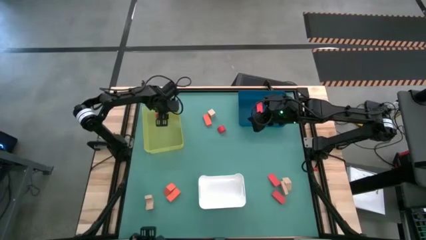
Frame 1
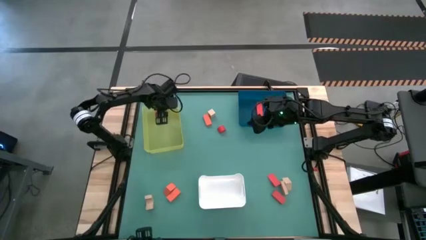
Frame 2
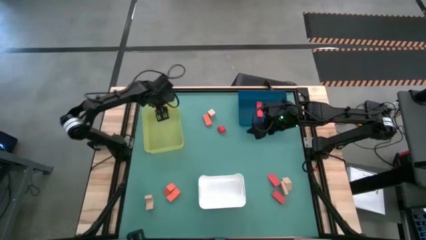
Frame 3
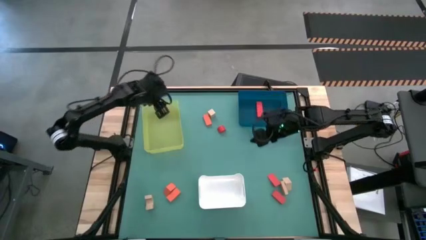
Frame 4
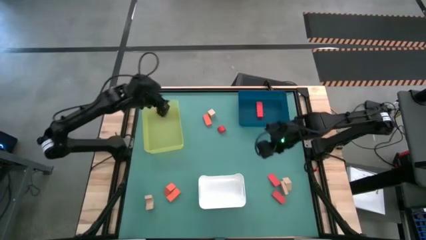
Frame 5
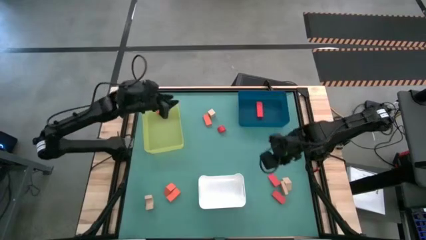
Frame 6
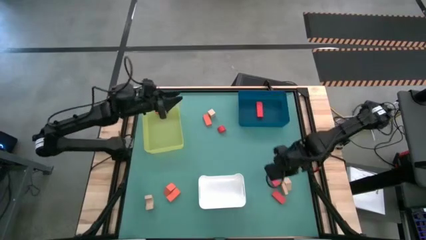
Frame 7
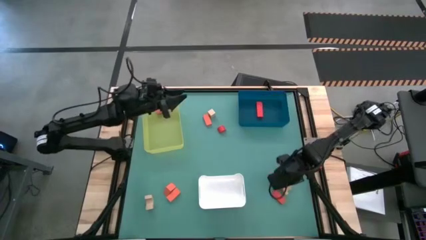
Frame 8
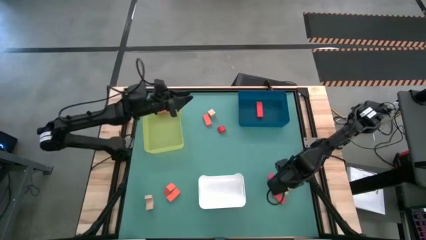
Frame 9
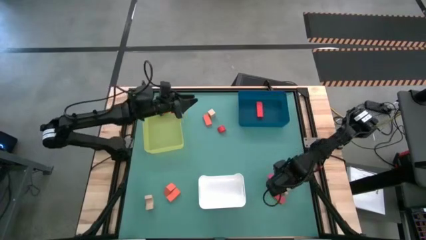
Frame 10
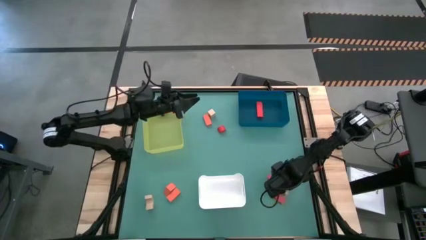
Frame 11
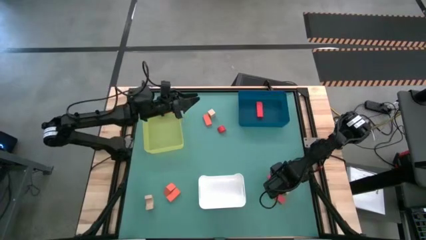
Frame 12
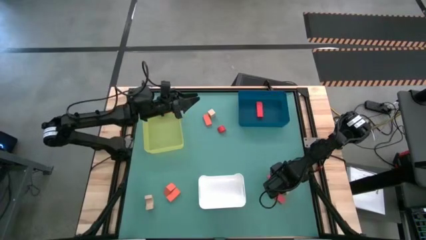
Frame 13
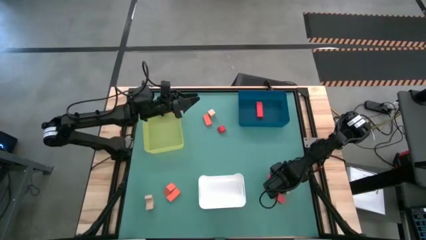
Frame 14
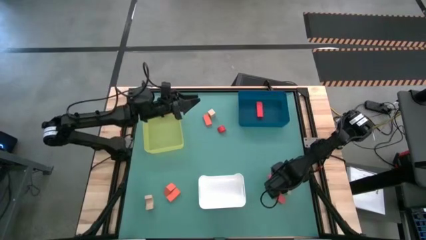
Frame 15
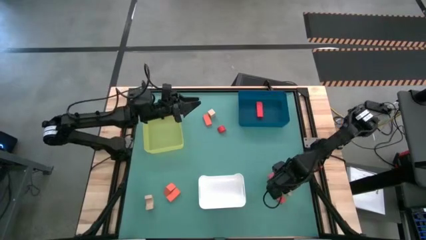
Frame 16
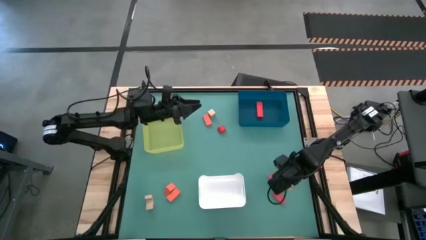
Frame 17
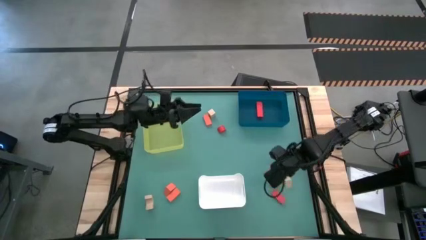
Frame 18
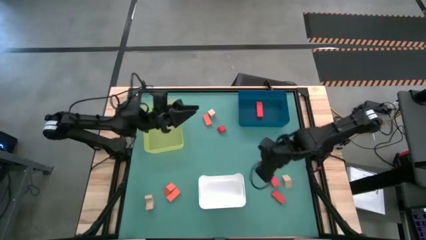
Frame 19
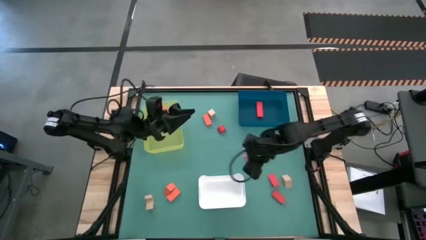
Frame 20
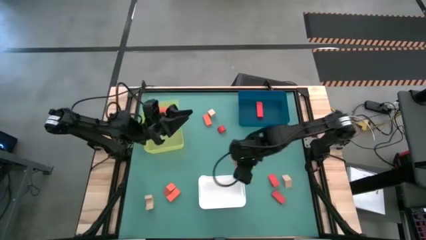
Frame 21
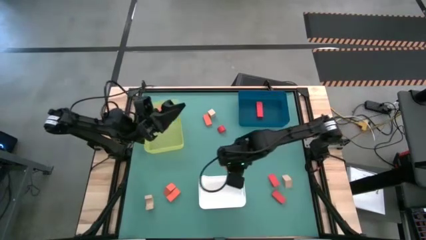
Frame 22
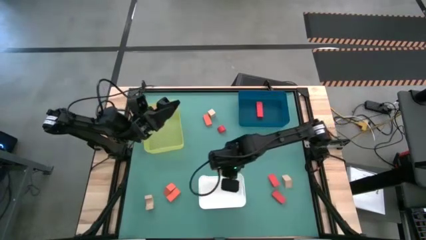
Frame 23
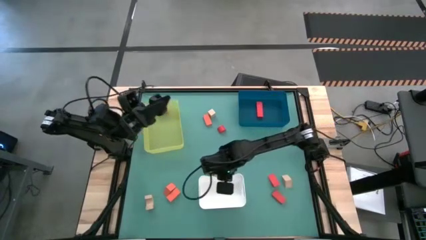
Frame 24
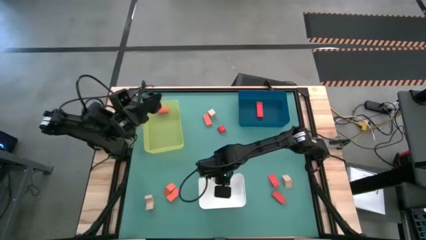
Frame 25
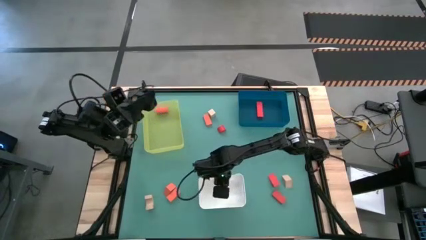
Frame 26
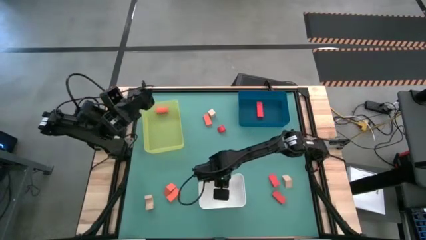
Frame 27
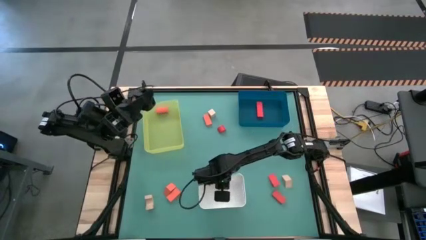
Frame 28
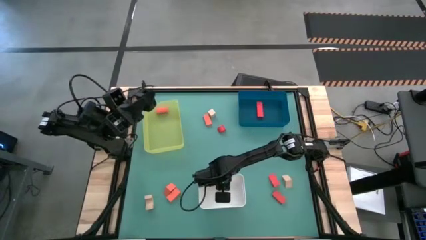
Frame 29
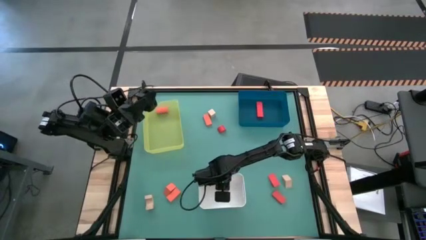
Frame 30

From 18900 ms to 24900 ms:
Task: Sort & place blocks by color
Put the brown block into the white bin

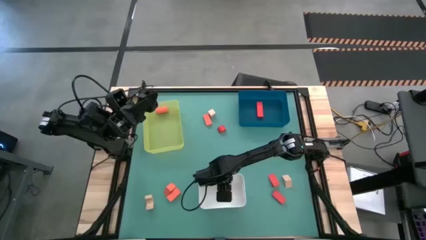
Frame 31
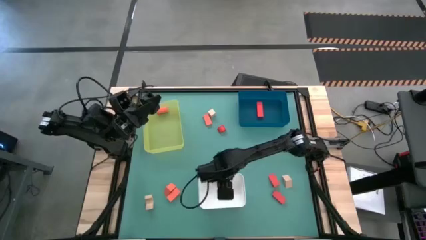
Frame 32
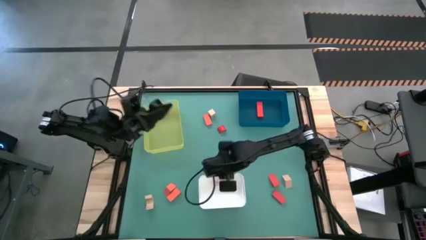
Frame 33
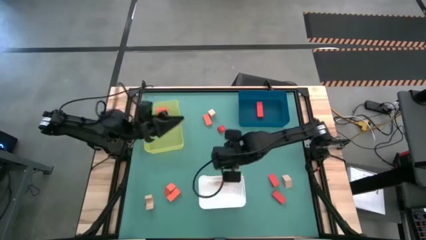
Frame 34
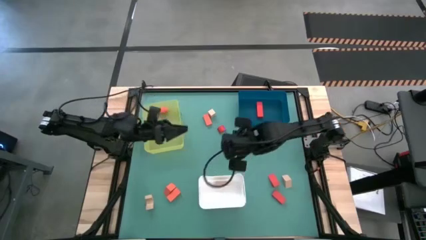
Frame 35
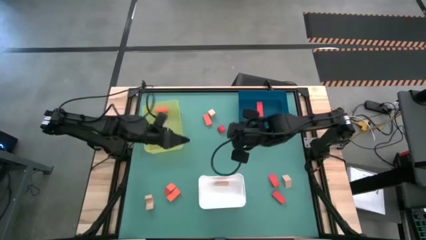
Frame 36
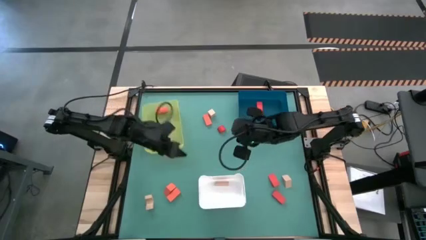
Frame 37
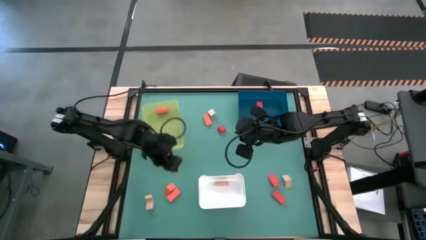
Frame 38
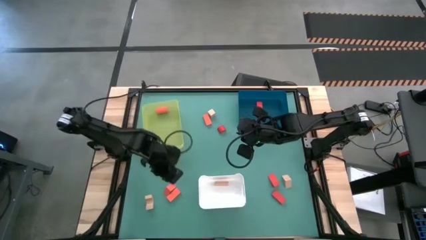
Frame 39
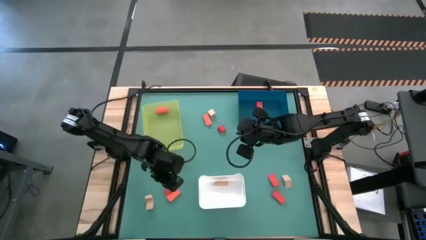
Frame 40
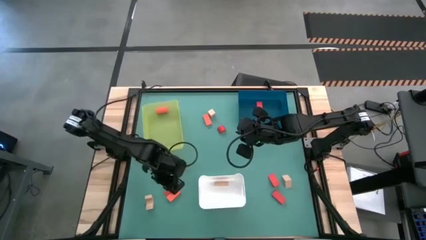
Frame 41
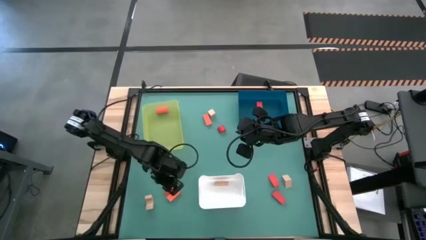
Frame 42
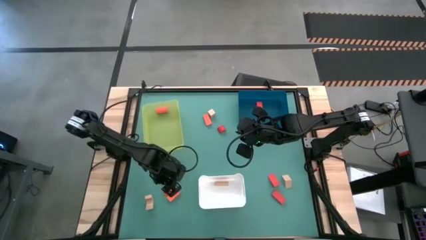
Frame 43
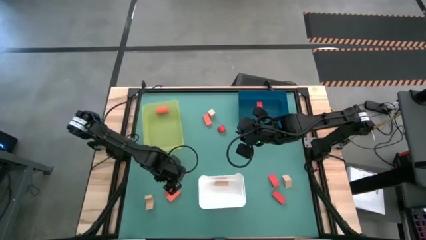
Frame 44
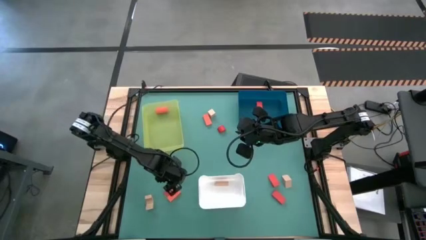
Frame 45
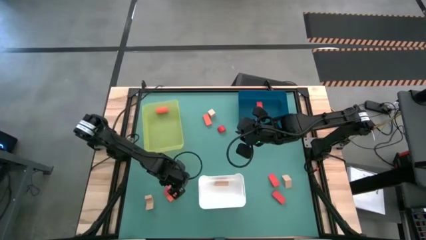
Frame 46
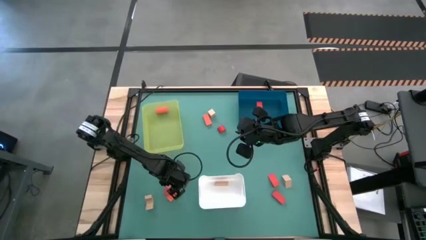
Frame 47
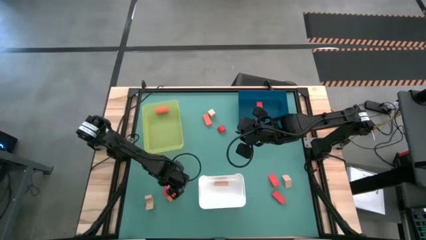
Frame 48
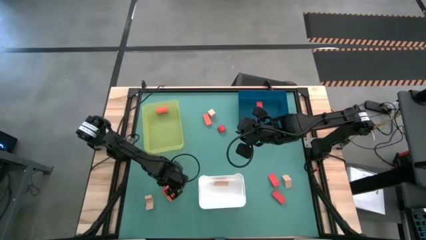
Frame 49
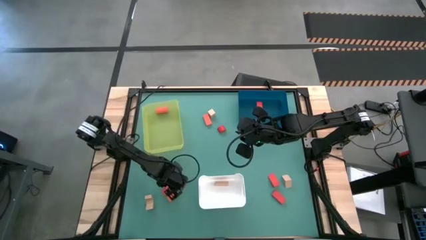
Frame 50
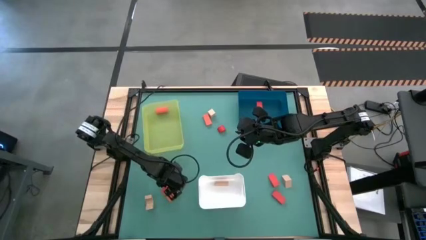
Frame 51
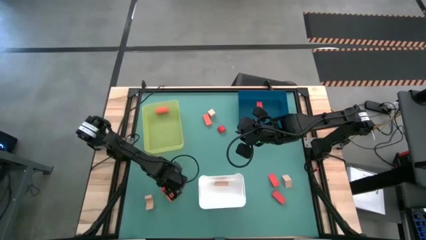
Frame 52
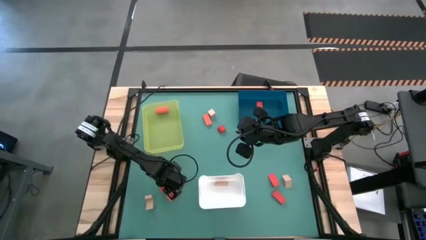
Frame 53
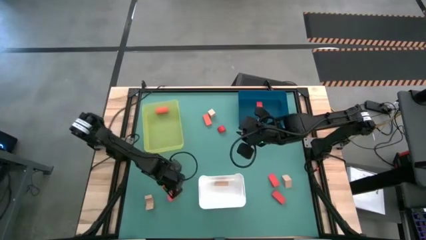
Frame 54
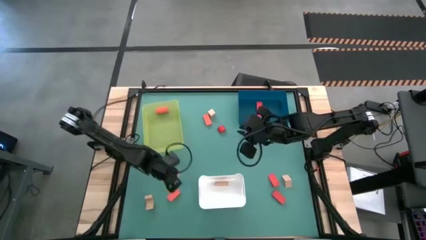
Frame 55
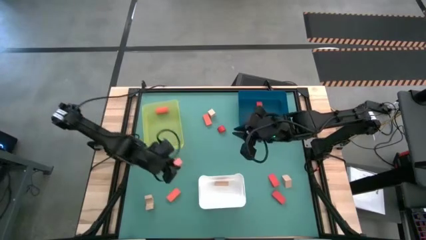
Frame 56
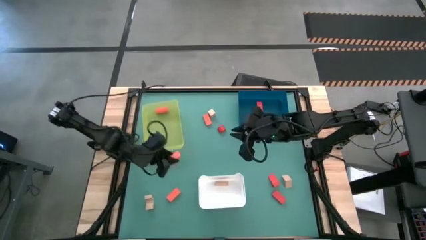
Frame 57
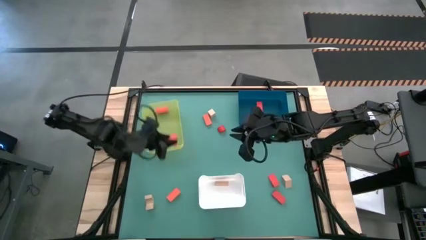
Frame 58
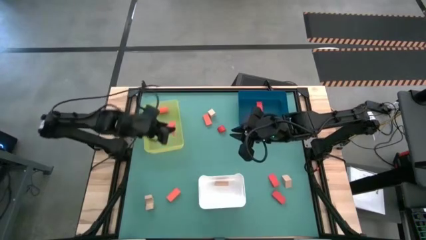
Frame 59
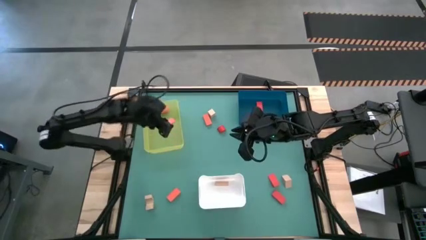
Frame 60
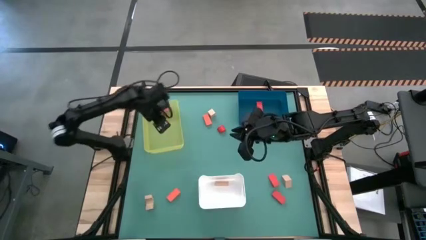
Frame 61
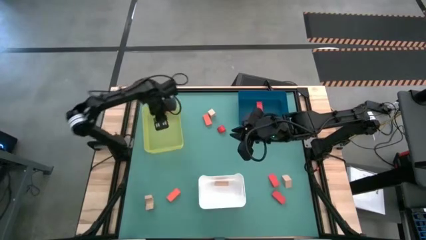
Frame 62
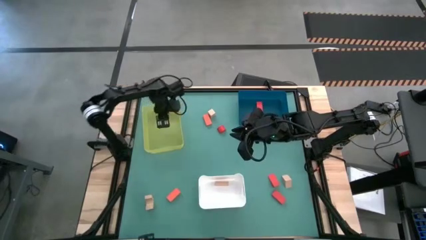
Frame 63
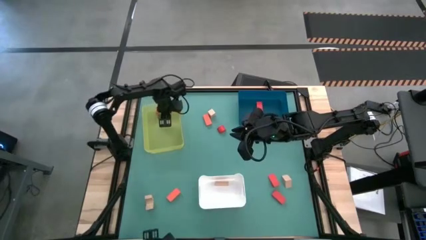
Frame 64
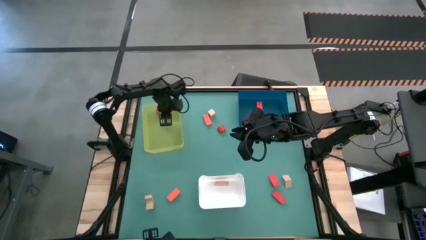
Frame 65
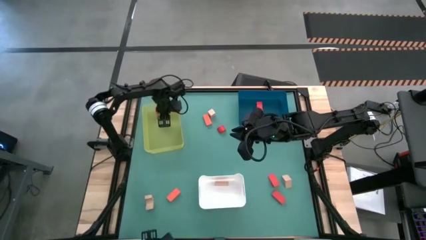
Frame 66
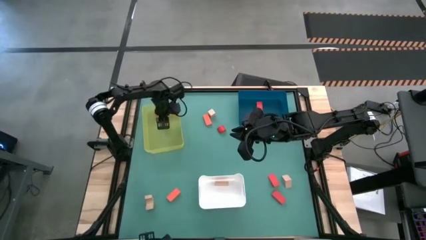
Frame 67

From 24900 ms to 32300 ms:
Put the orange block into the yellow bin
